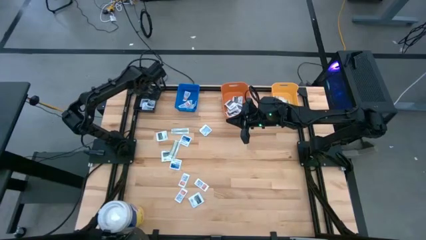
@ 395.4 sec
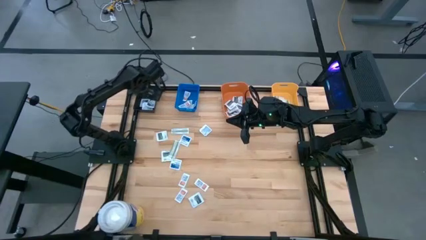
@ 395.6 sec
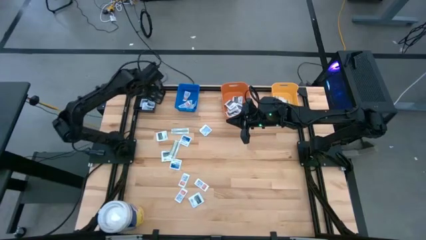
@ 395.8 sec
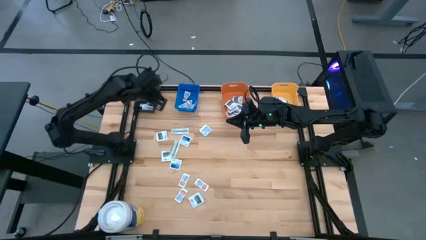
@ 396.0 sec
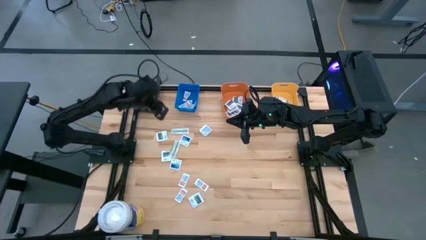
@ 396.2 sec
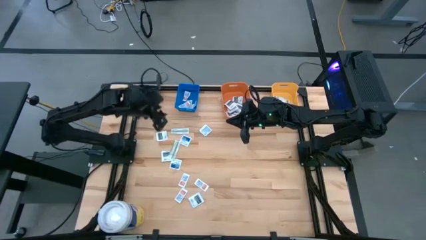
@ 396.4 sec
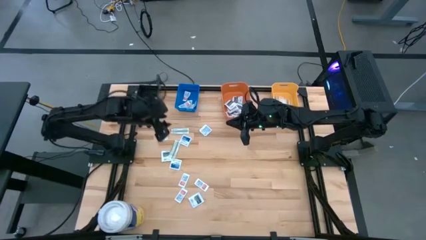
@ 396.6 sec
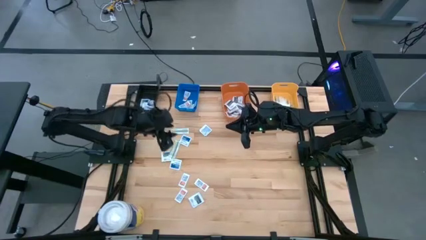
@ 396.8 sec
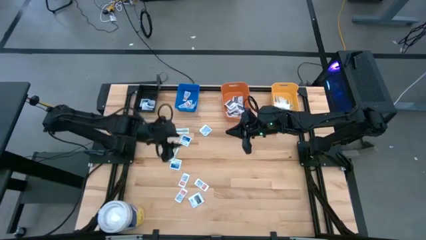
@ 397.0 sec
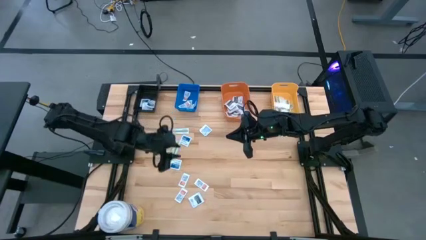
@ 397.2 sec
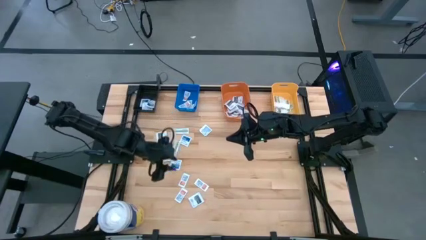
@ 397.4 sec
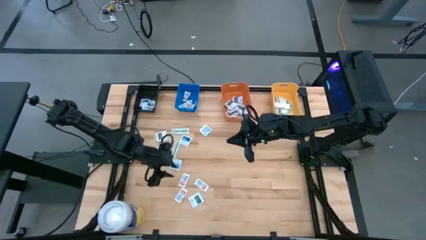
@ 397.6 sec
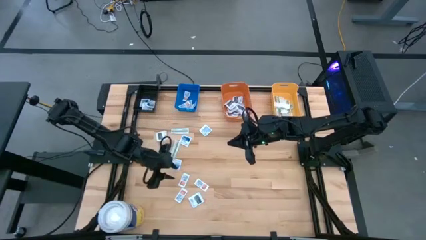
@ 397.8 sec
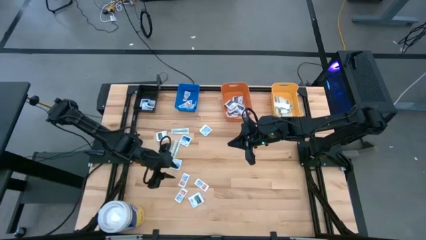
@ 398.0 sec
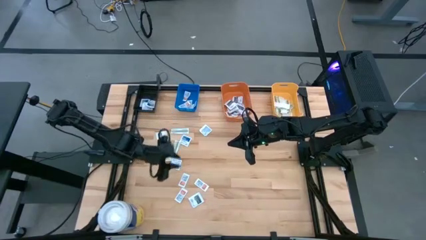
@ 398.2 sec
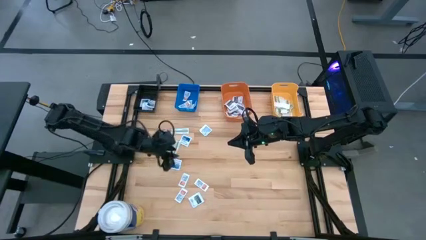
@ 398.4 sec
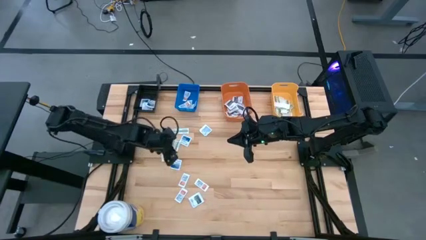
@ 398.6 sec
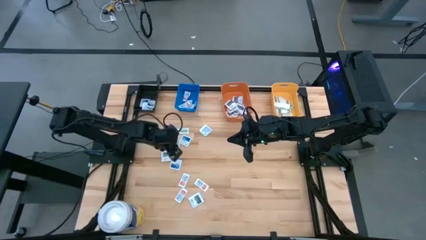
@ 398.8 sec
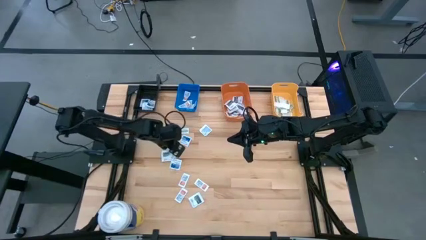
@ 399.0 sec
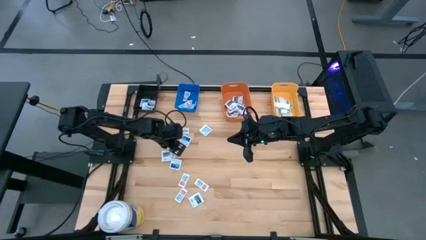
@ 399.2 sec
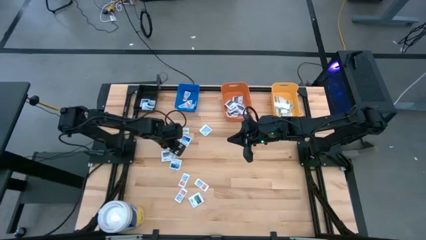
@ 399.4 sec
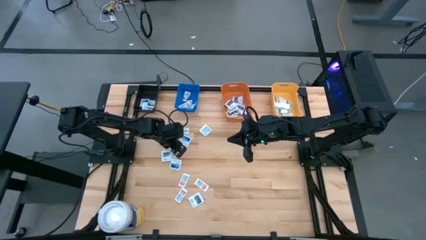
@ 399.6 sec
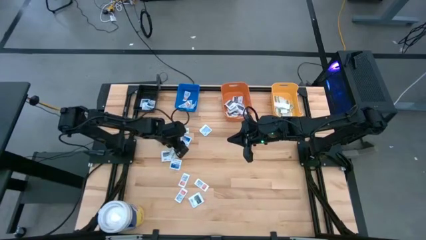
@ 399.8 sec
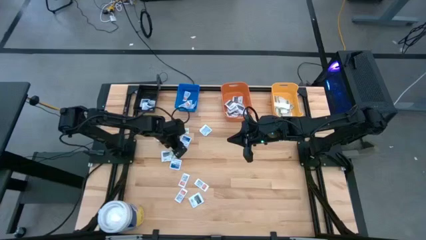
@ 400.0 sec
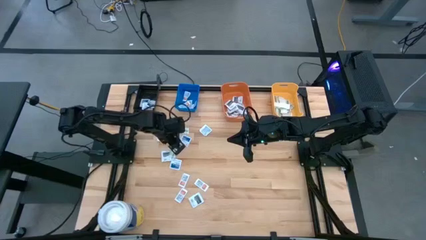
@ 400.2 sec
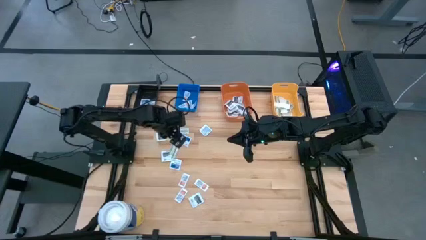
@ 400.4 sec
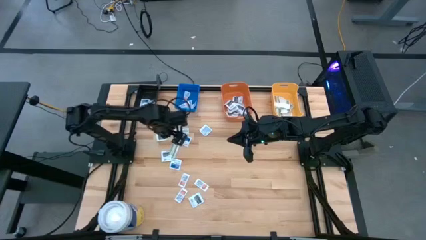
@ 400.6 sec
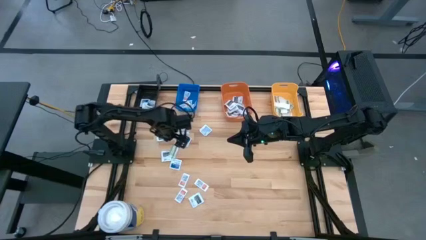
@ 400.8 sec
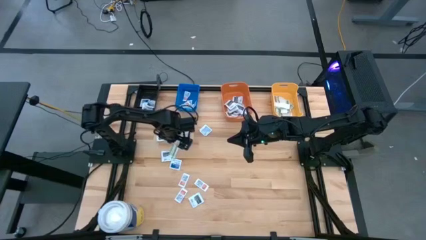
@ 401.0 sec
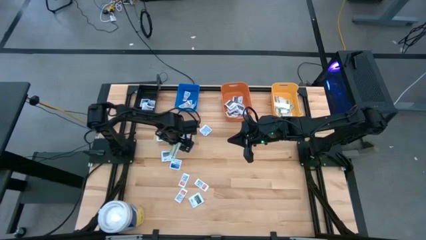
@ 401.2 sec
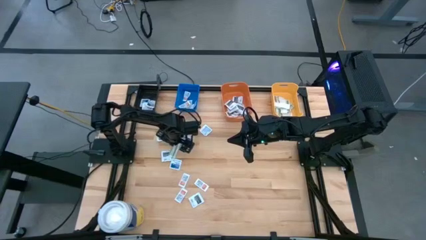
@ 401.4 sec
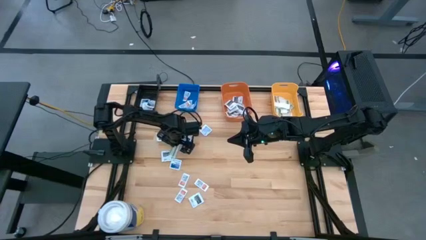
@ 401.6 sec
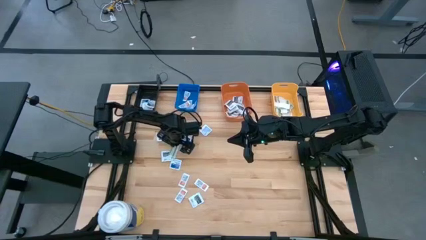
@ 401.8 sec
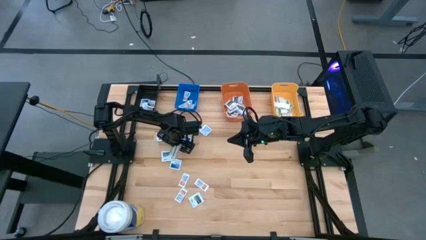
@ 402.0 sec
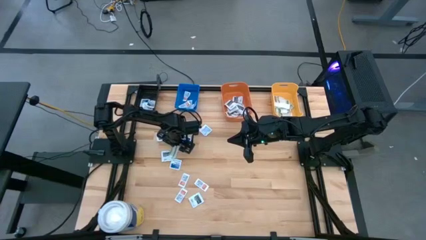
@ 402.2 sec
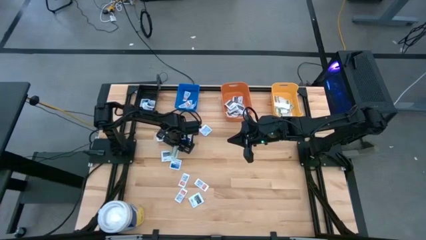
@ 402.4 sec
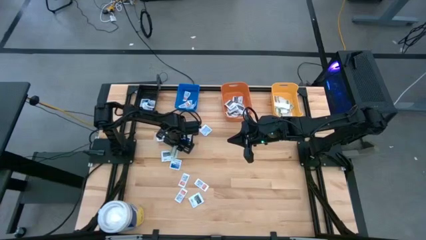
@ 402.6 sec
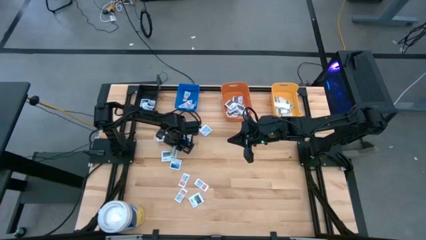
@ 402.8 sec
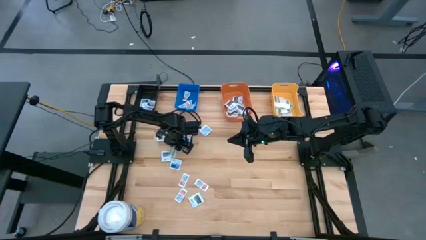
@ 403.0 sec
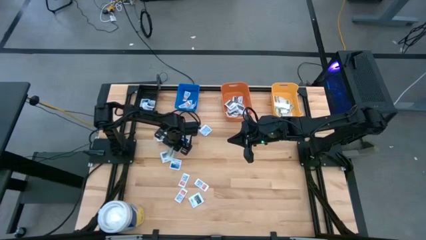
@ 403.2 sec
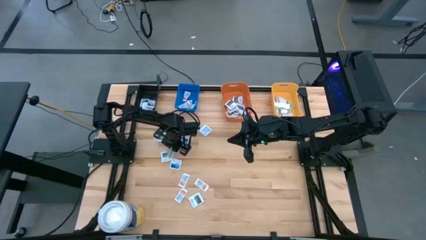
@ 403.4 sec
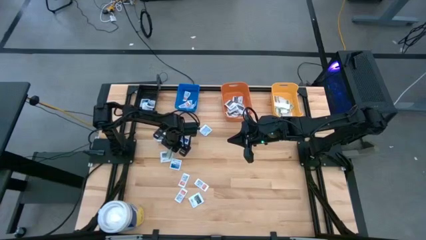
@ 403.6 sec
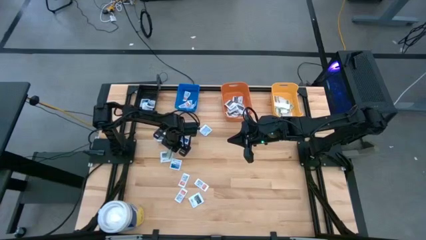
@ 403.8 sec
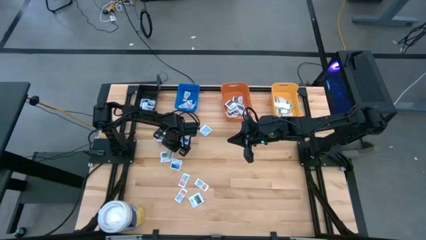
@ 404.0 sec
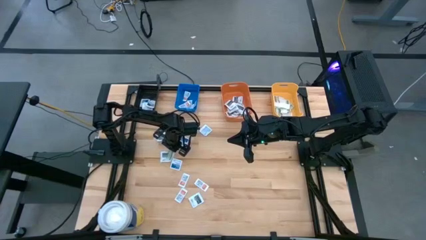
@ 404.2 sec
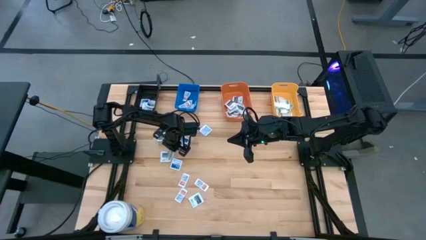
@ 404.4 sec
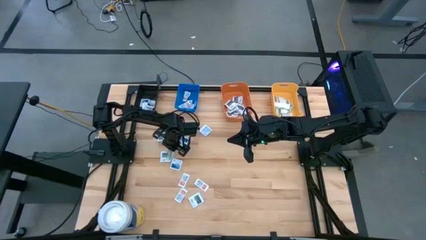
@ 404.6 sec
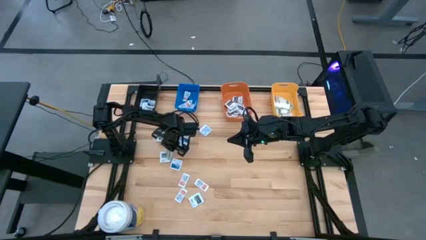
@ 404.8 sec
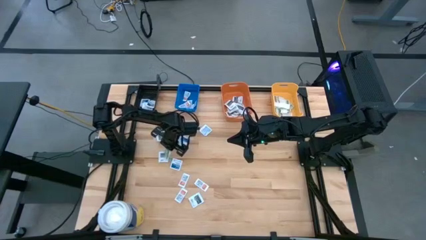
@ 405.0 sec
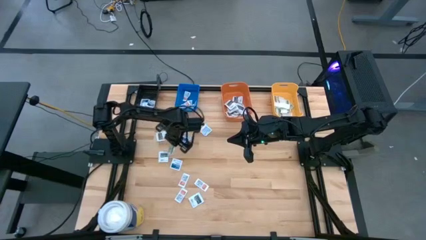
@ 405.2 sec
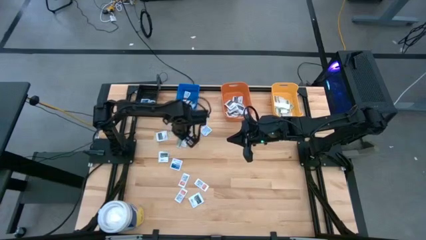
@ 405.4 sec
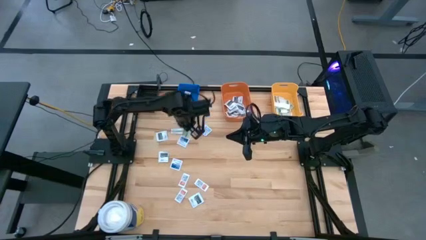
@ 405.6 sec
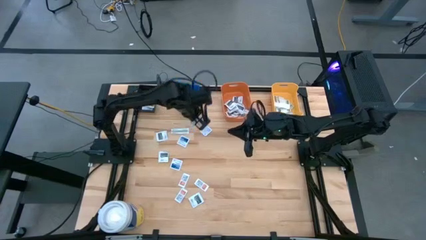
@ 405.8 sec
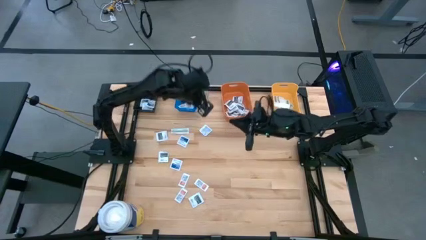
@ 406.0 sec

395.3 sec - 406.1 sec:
Task: Pick & Place First Aid Supplies
Put the bandage into the yellow bin

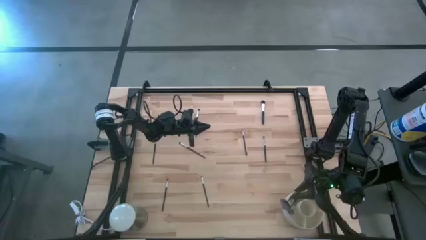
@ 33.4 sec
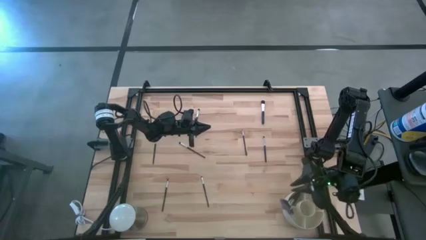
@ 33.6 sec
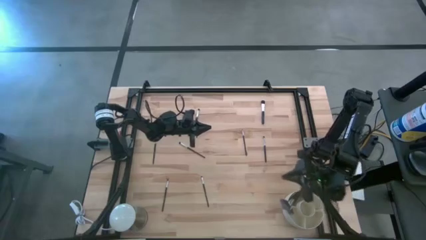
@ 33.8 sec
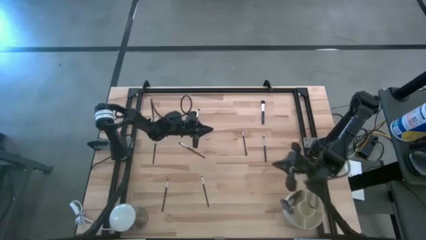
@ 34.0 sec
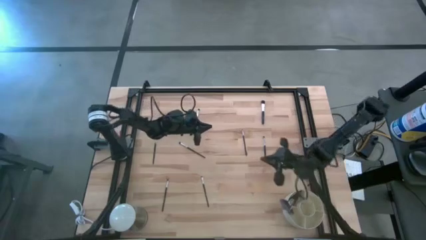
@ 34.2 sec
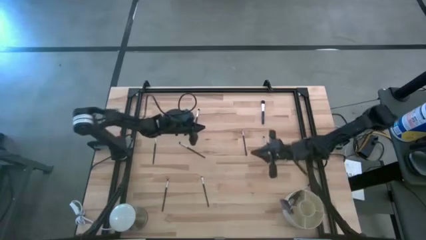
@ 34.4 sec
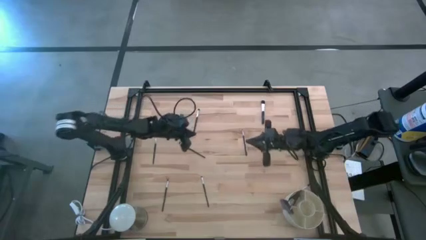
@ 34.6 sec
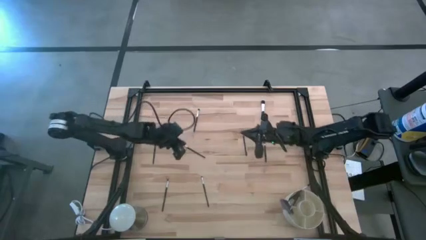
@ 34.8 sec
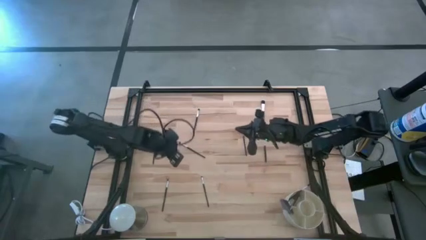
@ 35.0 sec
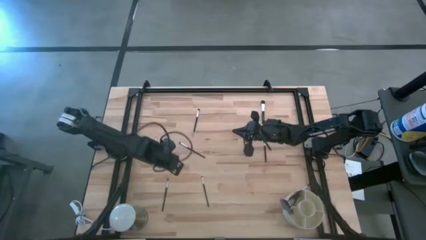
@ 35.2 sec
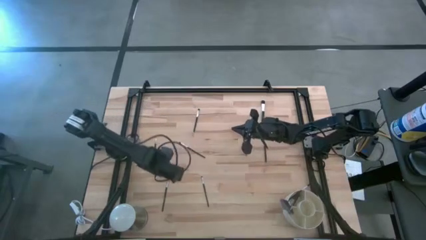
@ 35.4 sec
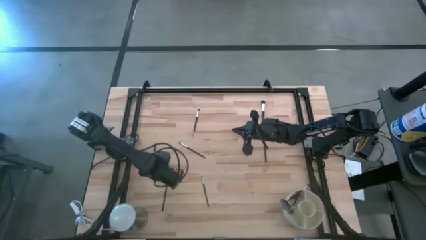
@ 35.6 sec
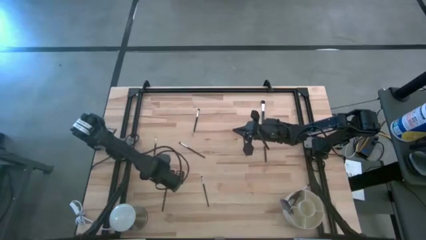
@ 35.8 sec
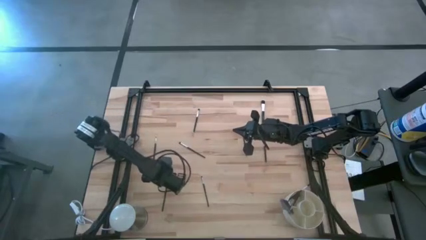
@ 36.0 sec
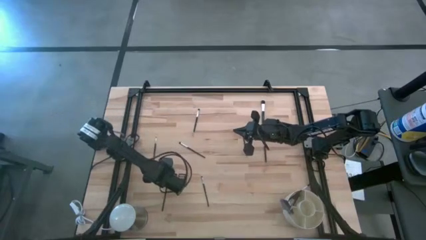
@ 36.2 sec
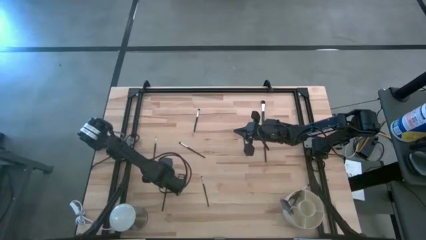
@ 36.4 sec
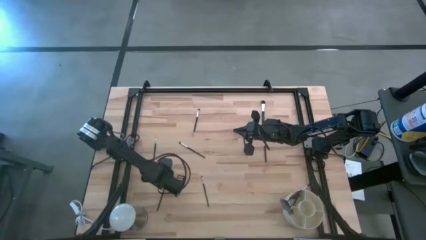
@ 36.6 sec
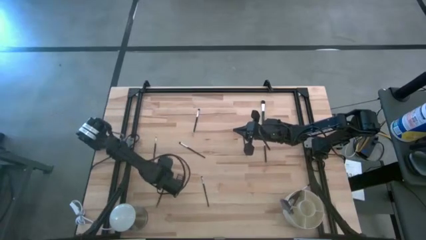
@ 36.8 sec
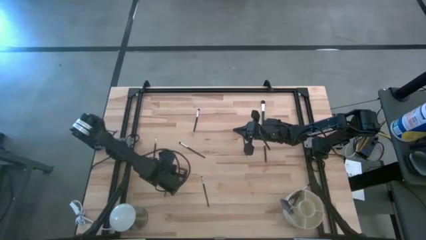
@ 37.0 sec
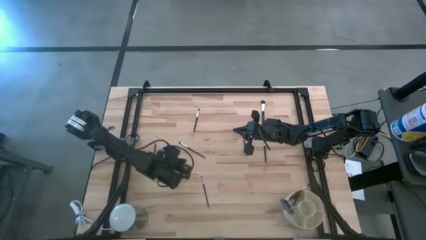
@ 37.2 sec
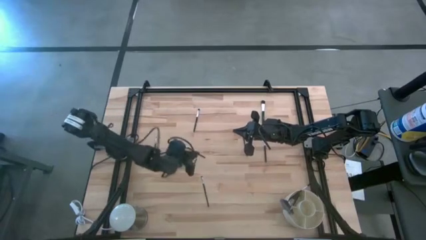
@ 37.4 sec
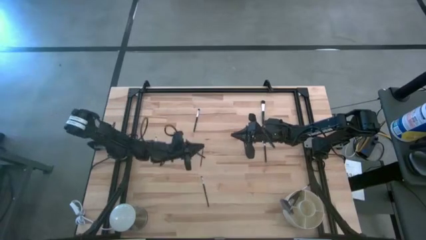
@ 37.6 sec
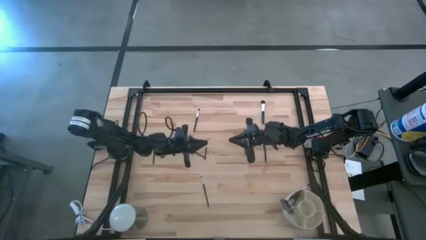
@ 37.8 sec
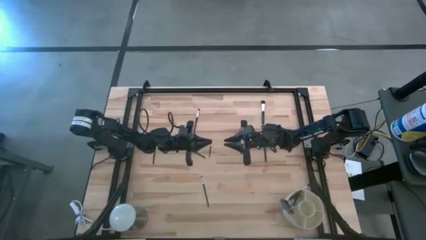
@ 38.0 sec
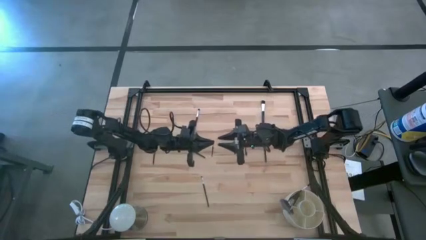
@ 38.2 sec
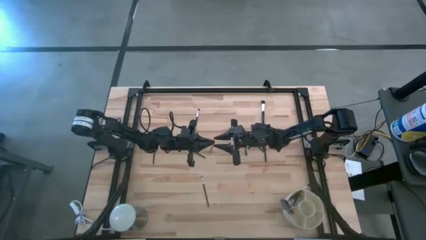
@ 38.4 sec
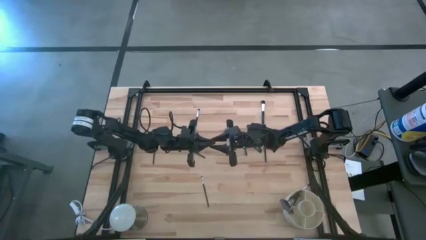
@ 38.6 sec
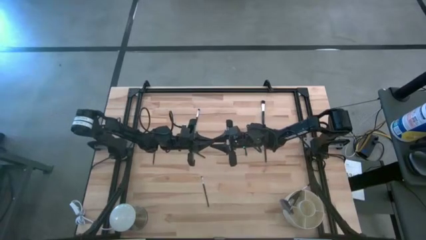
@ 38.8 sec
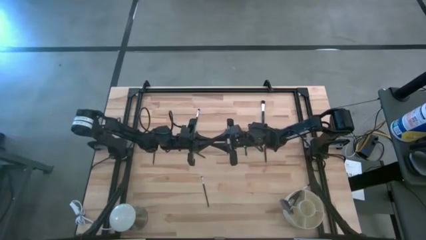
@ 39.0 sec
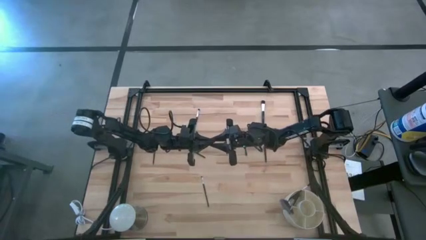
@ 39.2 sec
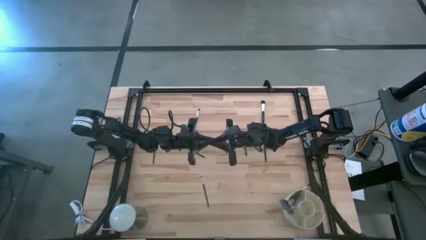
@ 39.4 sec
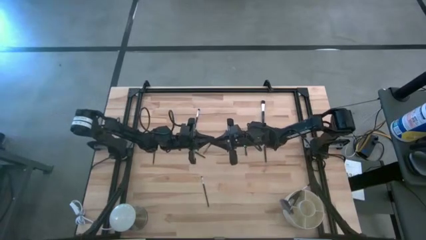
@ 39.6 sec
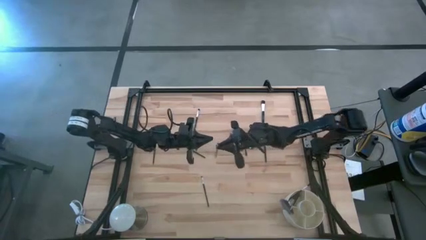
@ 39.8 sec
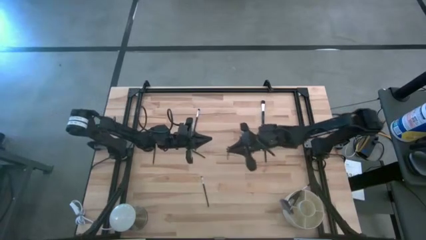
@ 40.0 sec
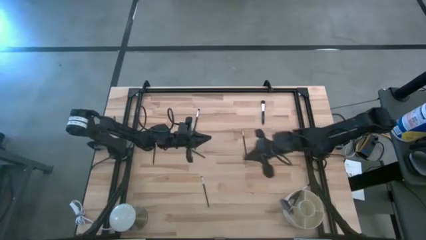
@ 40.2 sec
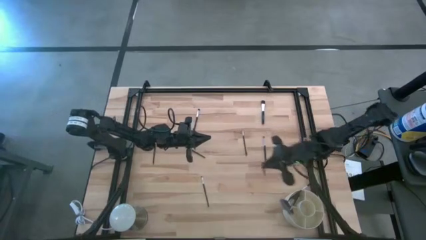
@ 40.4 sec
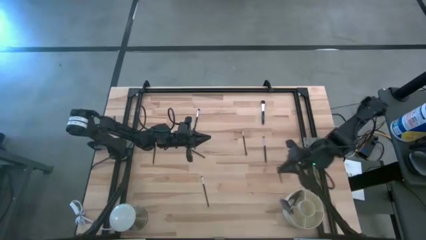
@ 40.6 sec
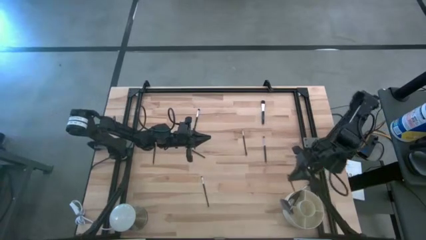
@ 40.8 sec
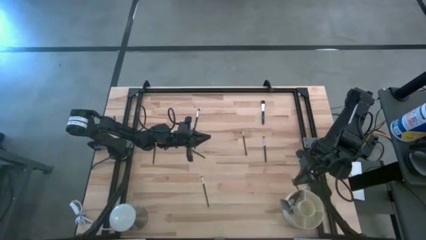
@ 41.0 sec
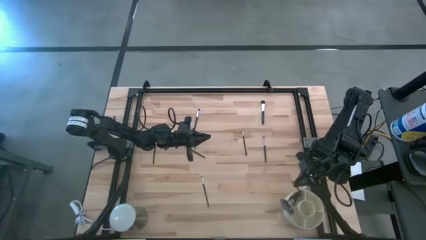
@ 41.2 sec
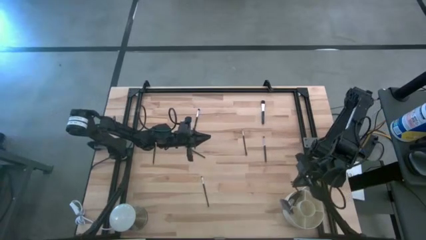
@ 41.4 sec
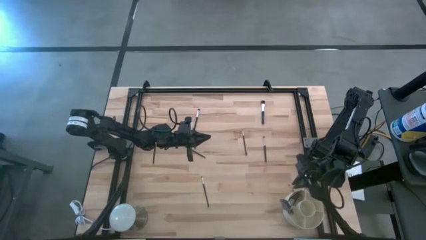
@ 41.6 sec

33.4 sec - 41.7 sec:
Task: Put items in baskets/containers
Put the black eyeshadow brush into the white organizer
